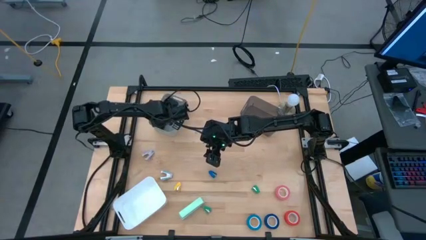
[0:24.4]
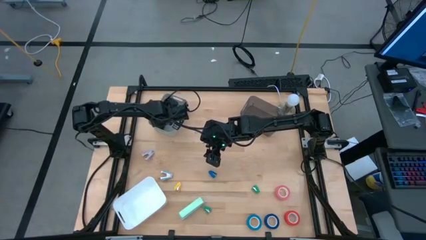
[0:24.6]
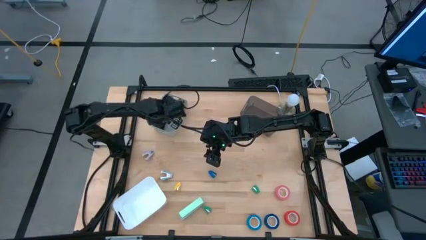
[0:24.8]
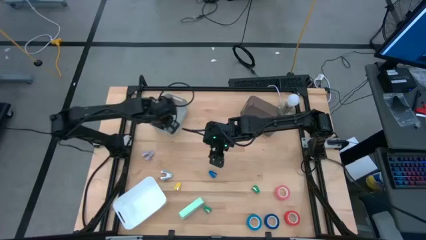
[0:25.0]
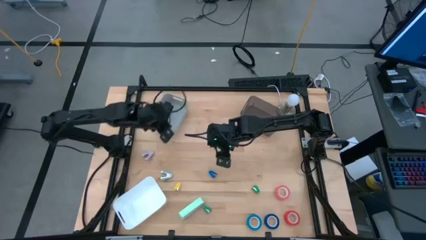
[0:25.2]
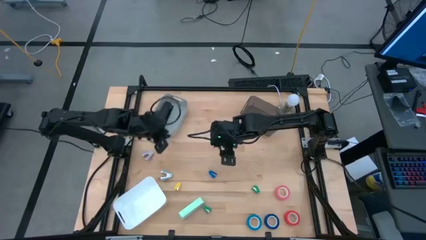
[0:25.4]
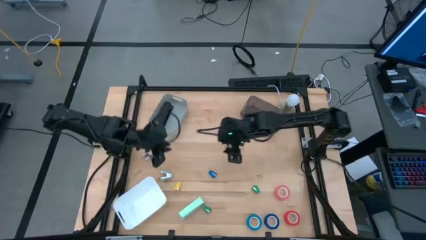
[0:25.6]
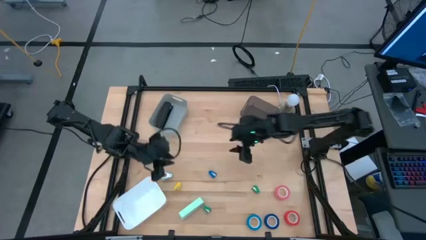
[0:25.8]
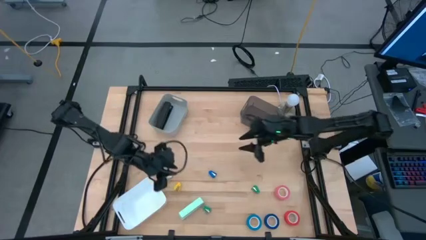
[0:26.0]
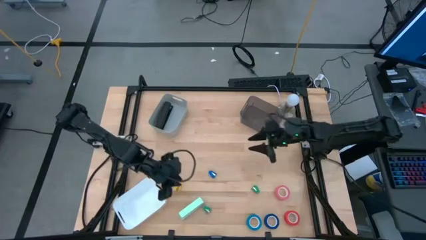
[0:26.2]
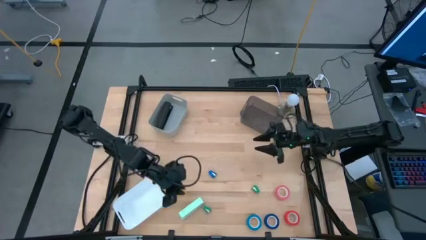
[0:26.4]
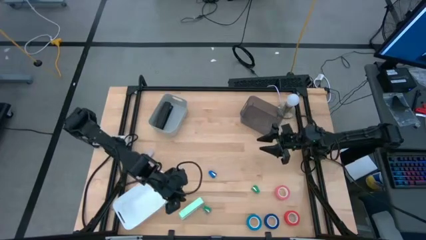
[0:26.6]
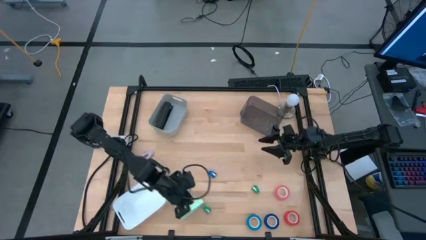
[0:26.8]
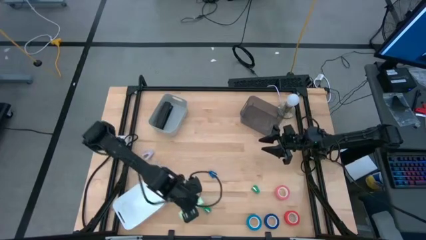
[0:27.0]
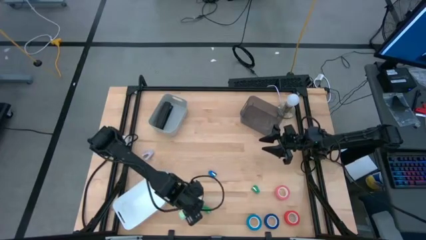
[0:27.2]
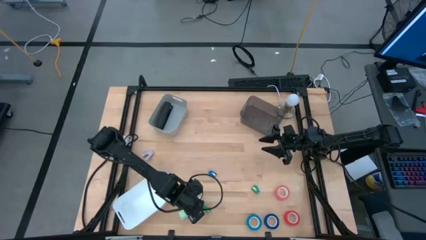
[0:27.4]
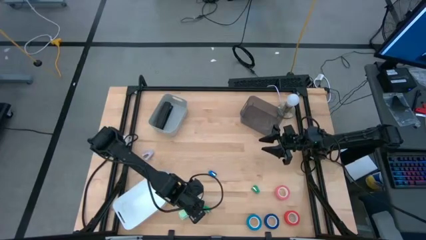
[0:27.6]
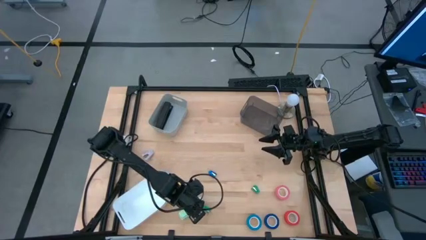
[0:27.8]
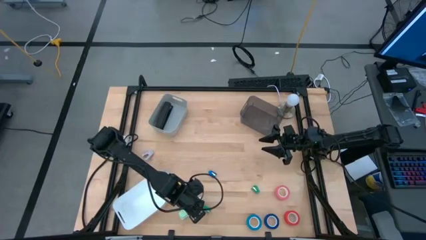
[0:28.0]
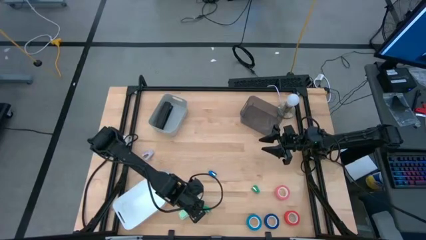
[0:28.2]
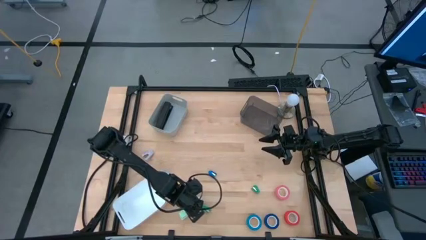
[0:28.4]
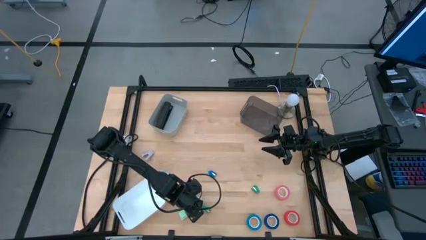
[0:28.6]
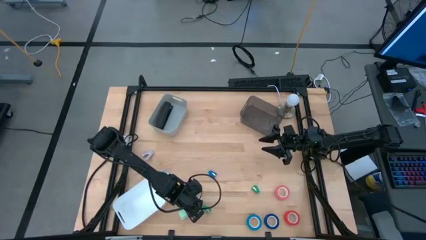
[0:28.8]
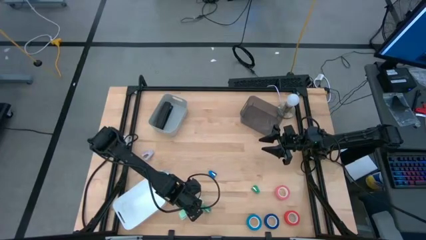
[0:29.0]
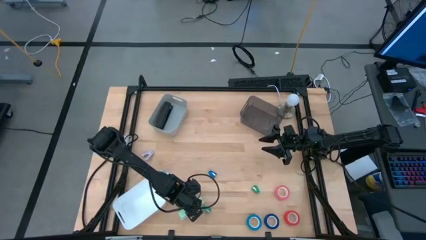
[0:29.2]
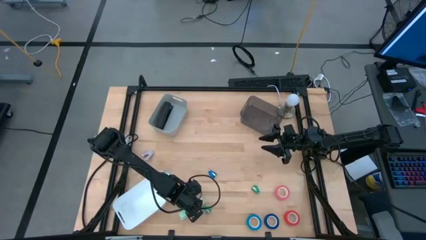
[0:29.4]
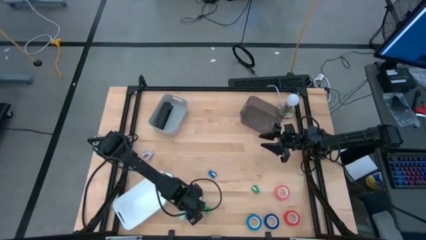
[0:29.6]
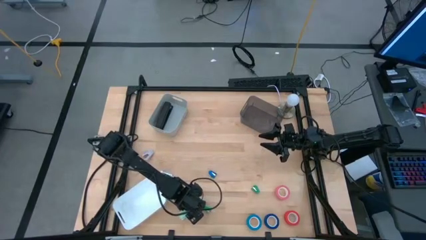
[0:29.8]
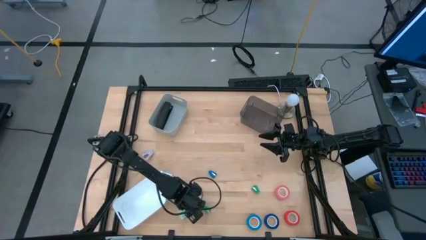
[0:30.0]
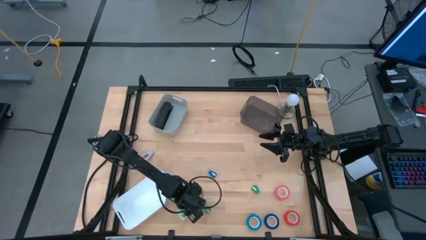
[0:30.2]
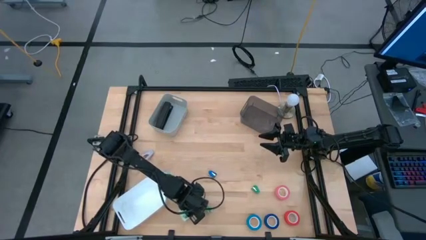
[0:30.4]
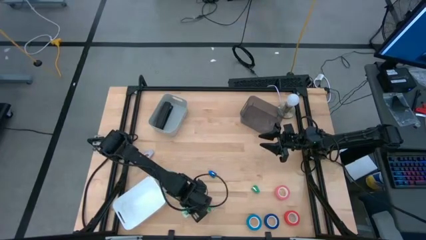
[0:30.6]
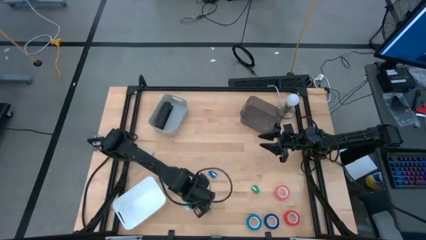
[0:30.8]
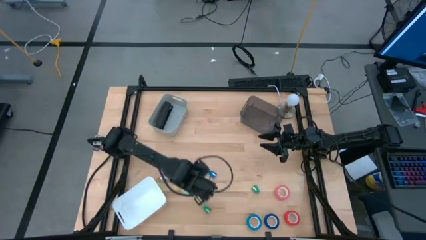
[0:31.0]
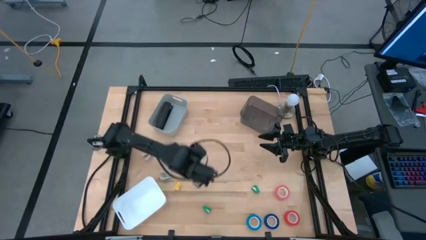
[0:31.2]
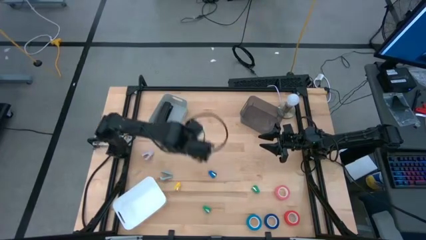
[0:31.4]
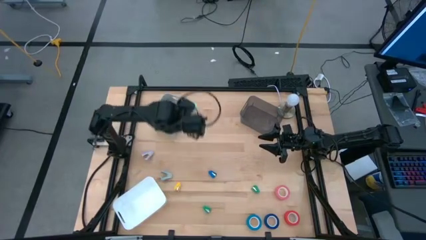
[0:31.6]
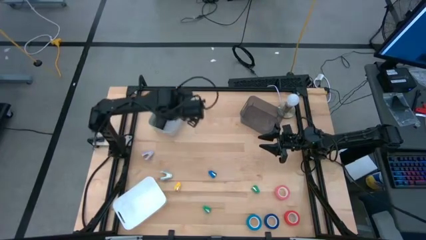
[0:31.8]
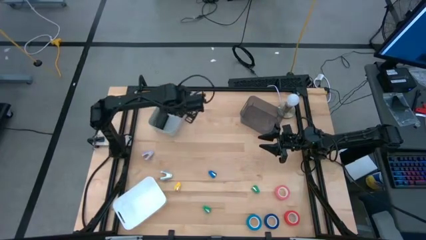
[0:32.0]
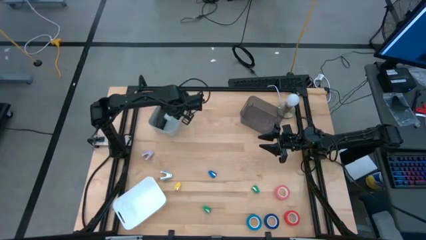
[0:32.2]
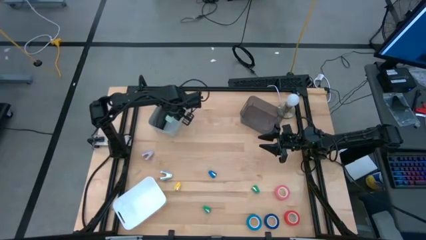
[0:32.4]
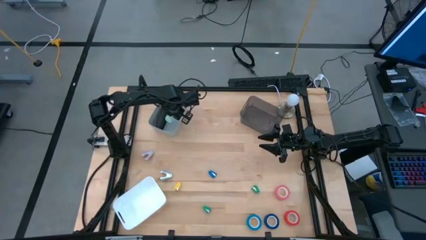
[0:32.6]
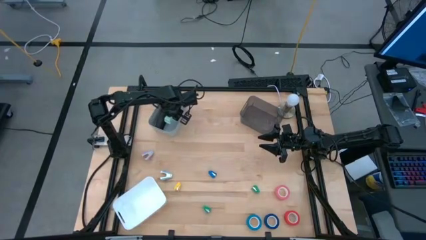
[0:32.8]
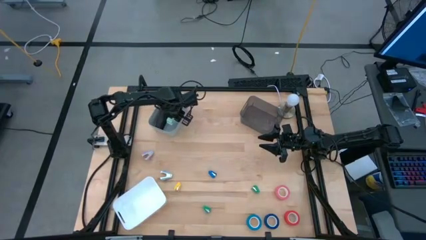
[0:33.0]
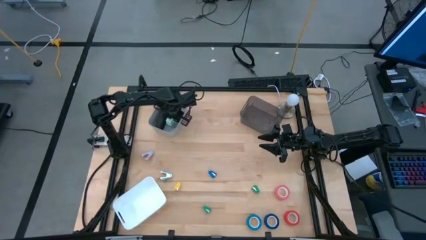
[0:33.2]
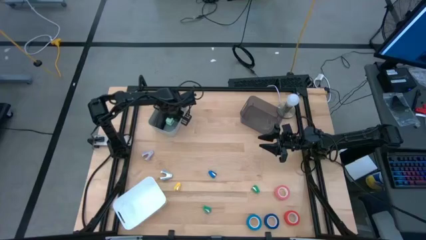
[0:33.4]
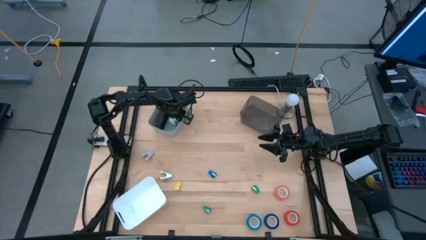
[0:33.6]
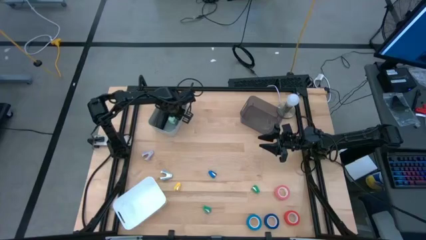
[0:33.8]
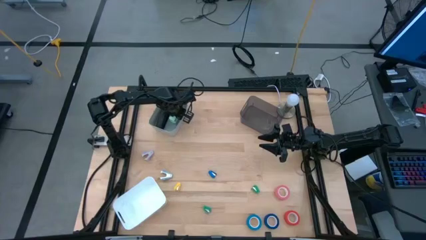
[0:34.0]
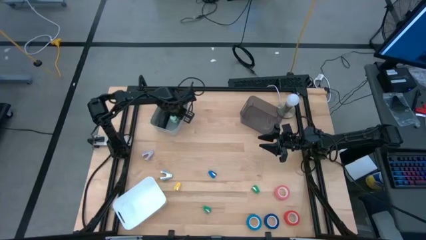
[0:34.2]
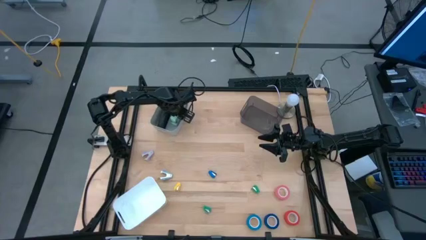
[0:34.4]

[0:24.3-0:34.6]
Task: Pick and place Stapler, Stapler remover, tape
Put the big light green stapler into the gray bin
